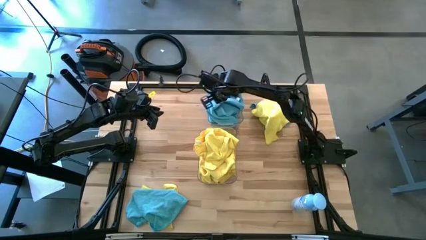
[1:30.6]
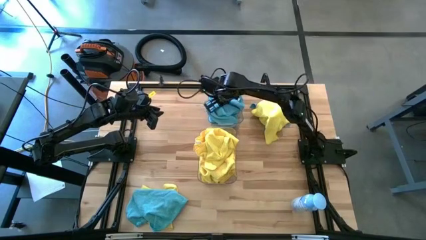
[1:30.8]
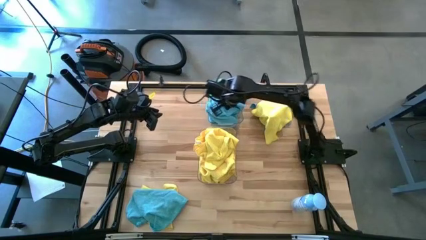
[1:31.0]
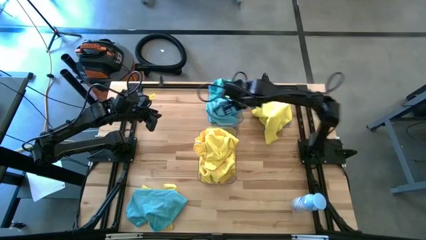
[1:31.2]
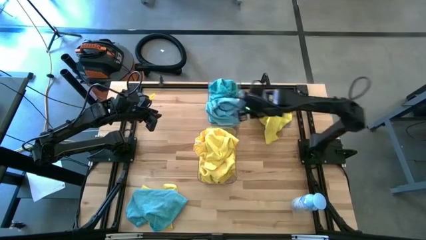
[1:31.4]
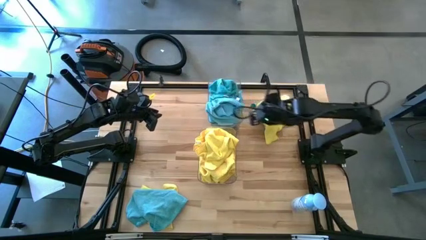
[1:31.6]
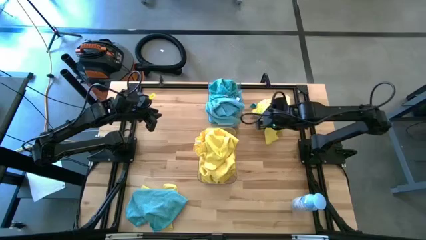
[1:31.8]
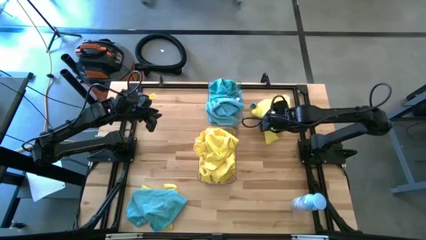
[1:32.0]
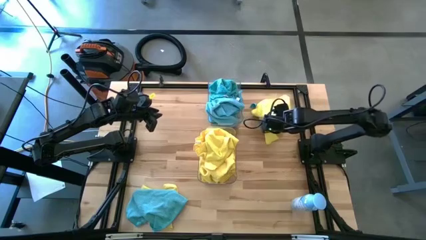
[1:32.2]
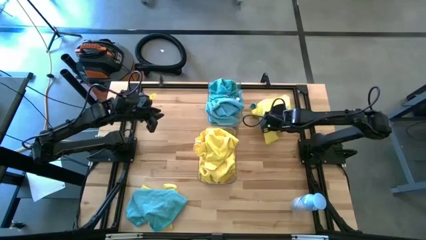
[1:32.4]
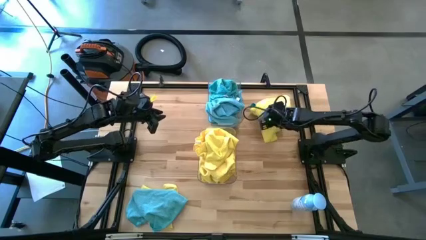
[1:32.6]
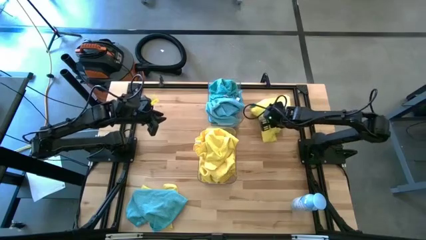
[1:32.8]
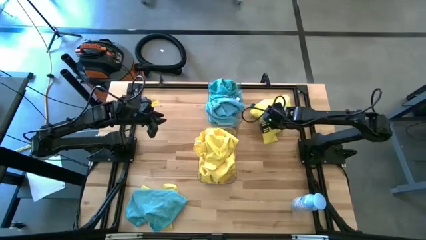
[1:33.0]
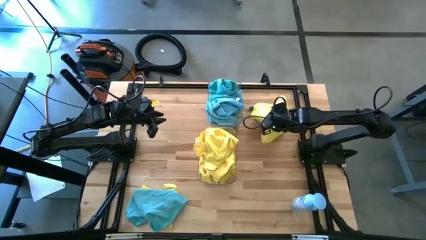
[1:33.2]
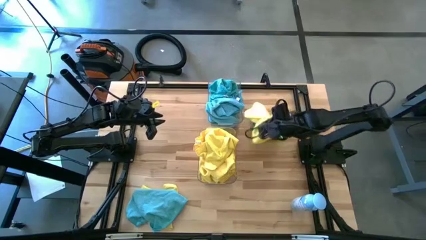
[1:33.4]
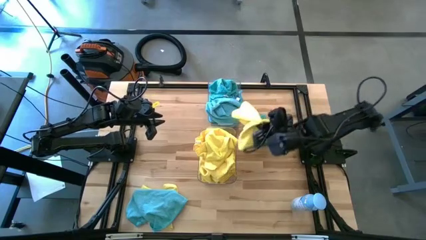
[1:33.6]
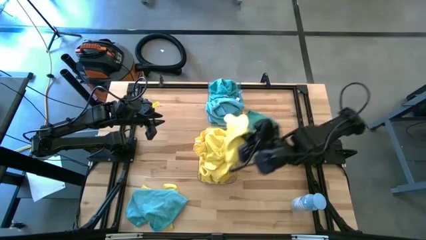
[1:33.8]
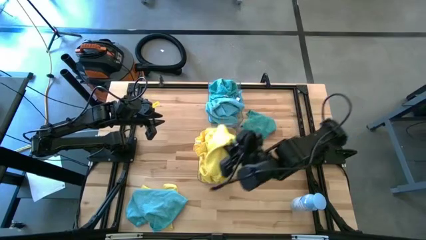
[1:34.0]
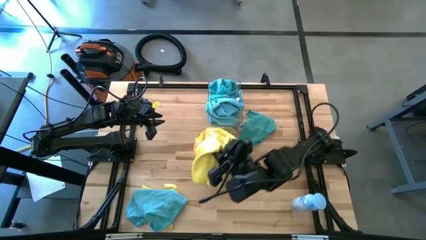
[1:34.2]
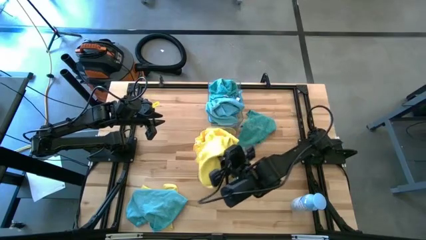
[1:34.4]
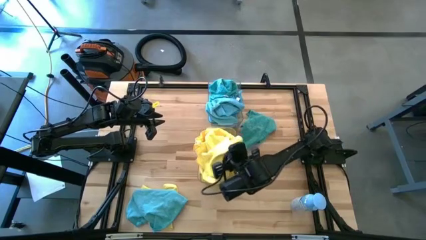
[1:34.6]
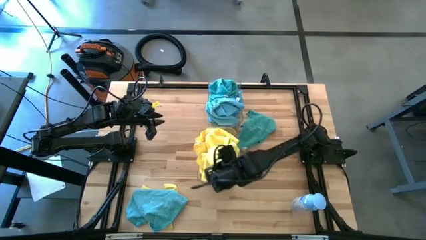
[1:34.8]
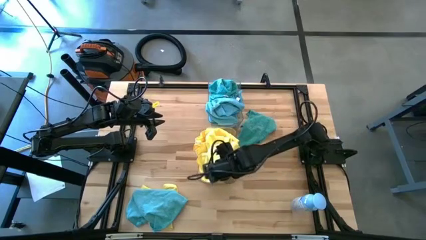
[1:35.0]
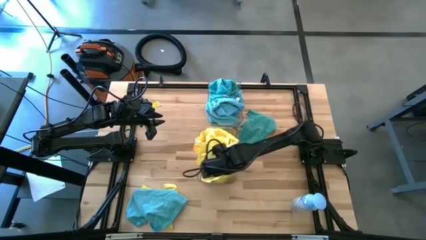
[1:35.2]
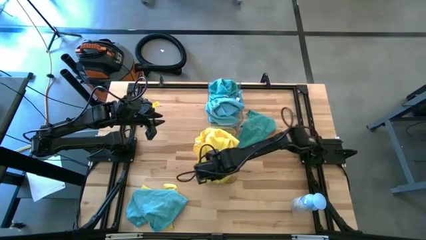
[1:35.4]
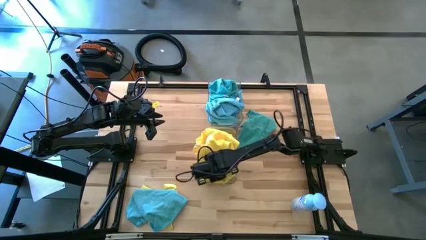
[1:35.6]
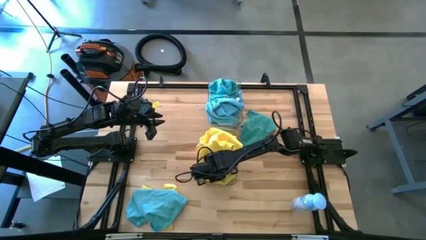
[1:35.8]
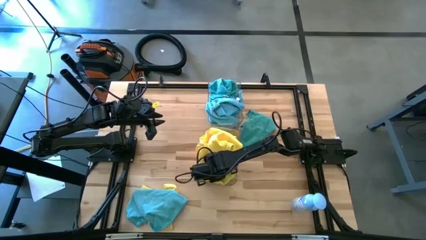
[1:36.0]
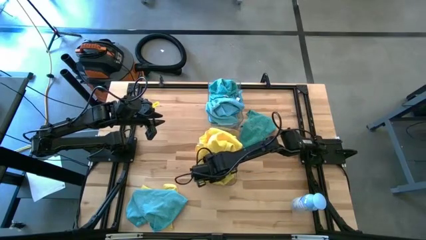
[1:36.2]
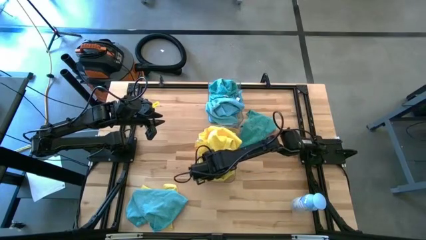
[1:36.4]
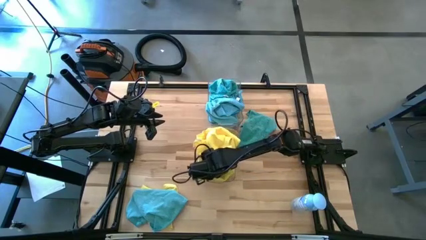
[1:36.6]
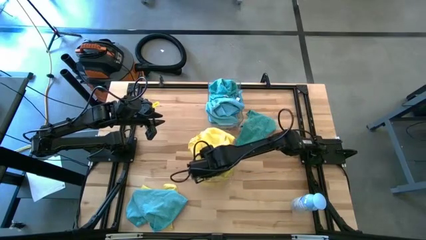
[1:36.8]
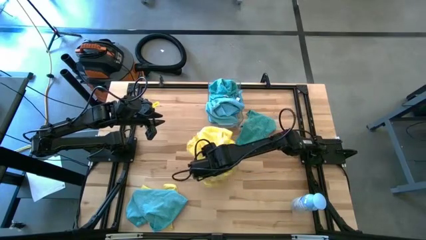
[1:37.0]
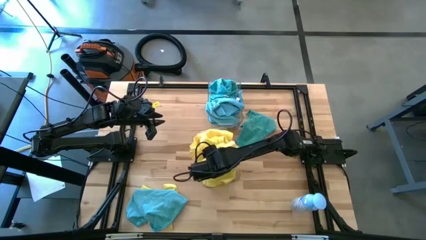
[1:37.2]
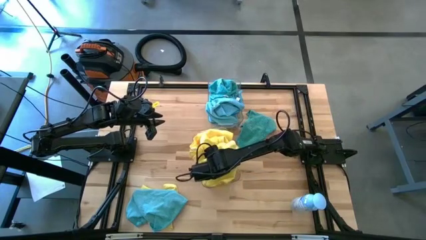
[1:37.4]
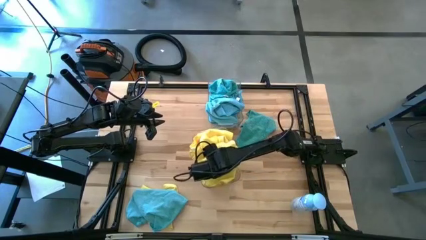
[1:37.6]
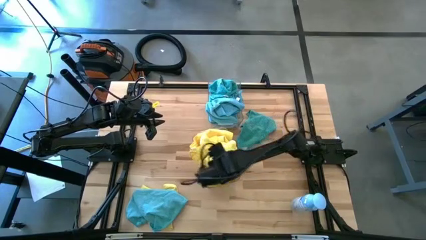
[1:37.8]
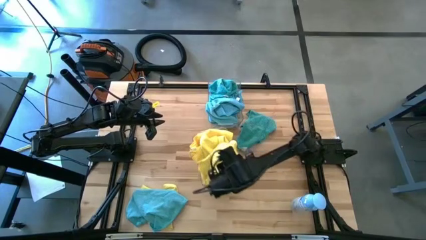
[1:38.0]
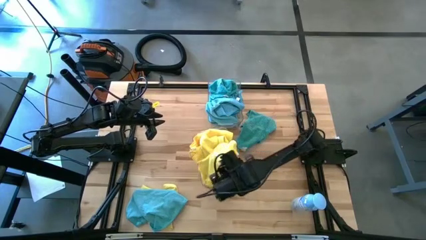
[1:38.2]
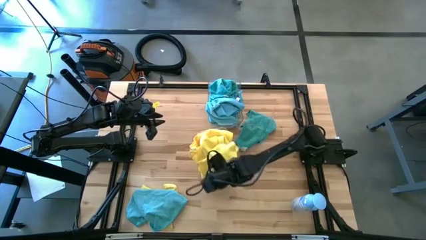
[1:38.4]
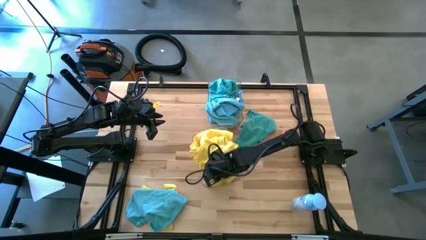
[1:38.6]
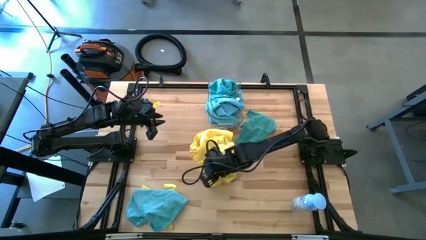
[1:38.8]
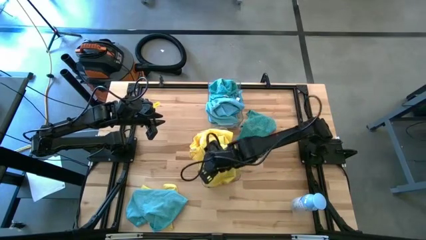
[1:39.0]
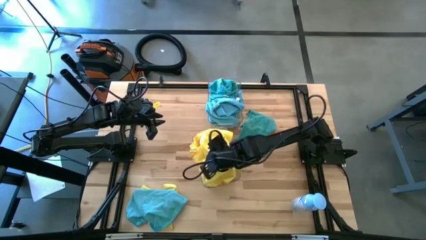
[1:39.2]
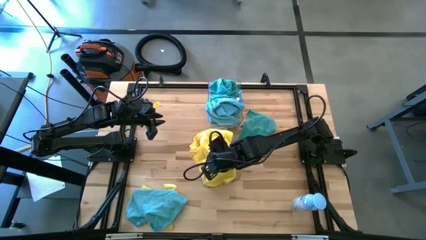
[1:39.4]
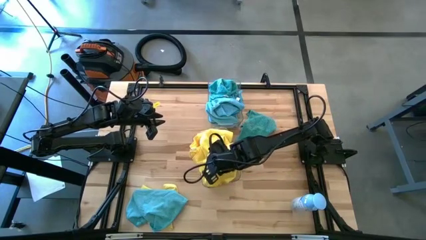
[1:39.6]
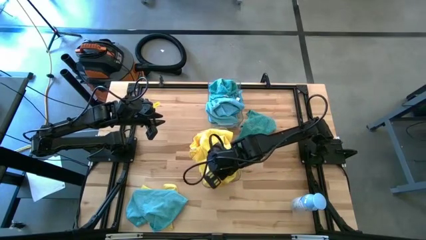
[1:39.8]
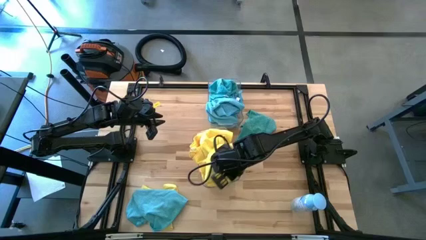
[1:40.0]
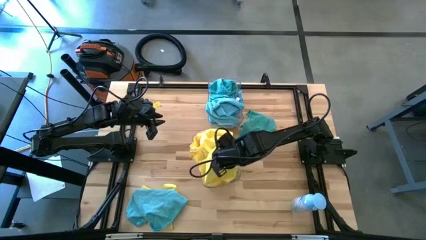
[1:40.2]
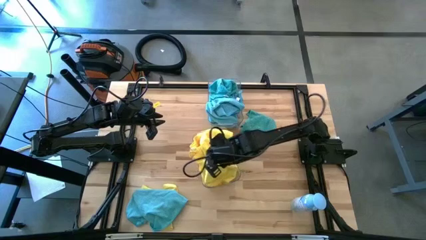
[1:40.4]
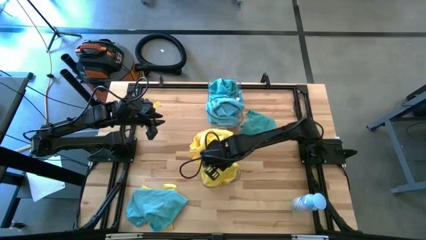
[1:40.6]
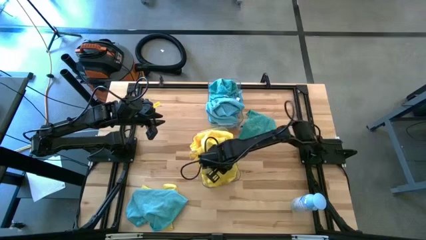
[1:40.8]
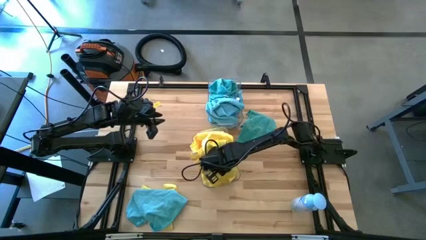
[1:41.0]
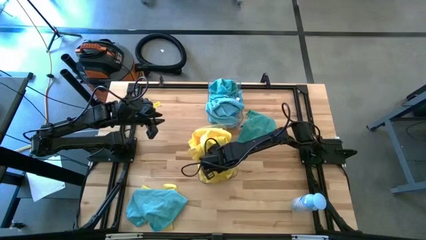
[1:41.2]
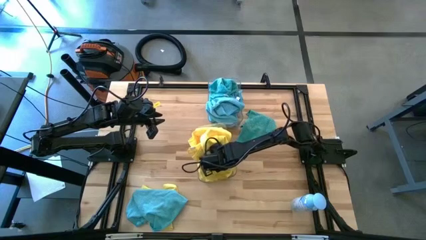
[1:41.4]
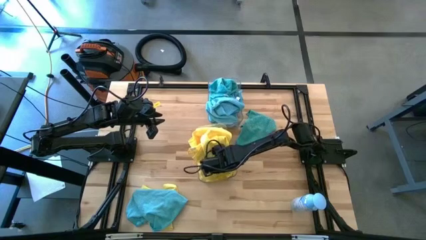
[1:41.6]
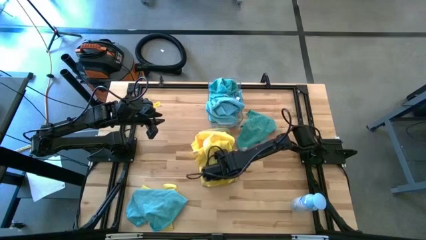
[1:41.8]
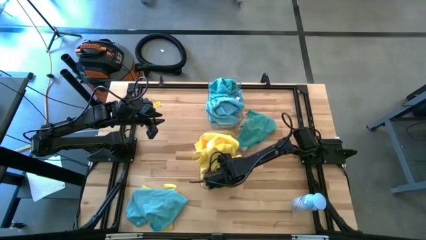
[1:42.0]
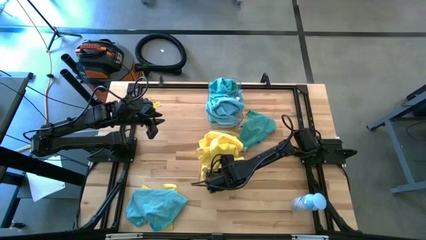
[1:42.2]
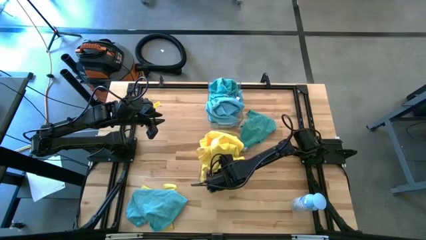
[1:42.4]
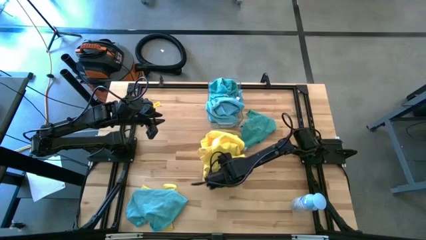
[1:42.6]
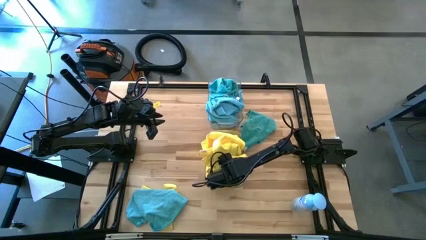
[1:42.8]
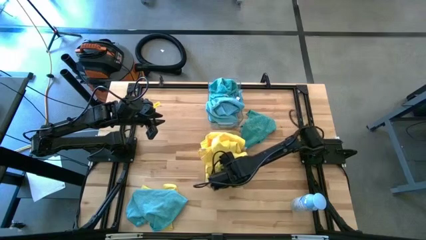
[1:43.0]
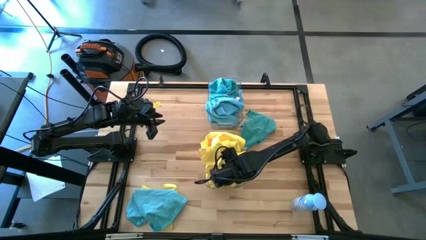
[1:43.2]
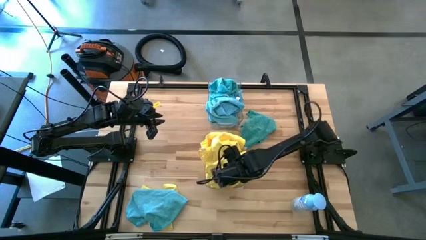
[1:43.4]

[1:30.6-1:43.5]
Task: Sort microfiber towel by color & place in baskets
Put the yellow towel into the bottom transparent bin

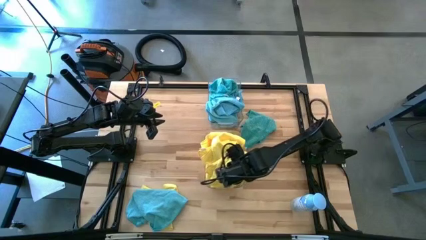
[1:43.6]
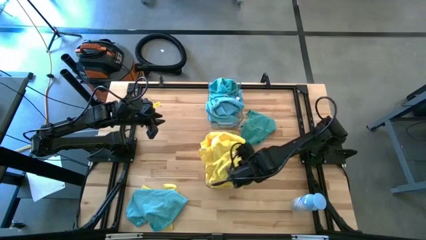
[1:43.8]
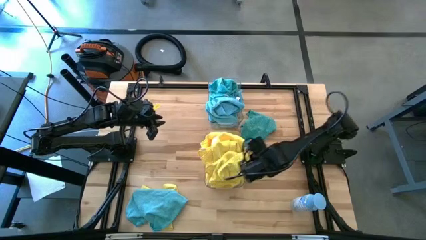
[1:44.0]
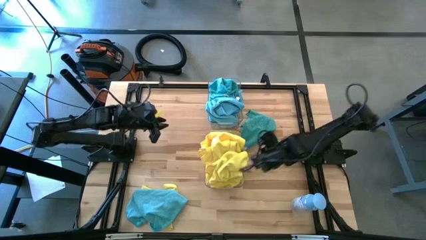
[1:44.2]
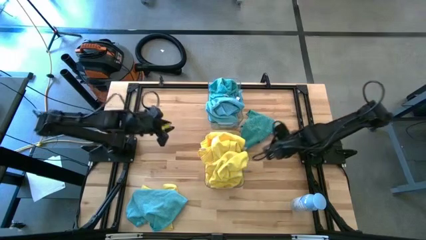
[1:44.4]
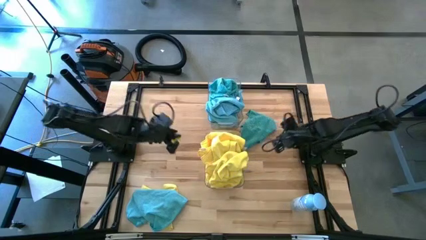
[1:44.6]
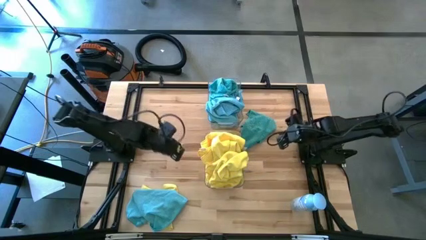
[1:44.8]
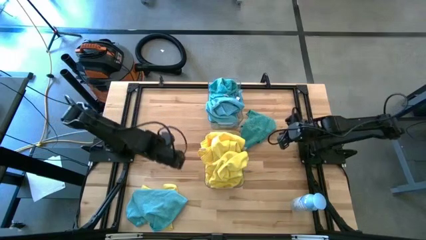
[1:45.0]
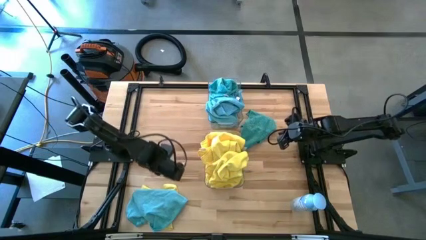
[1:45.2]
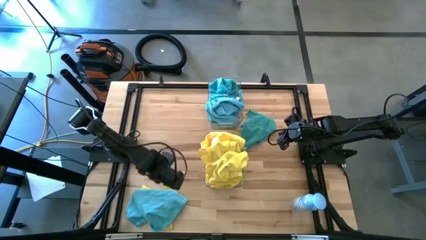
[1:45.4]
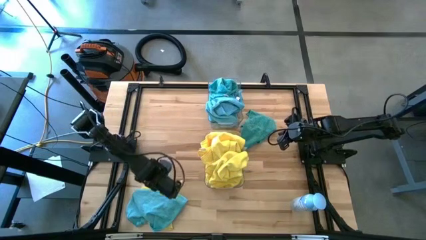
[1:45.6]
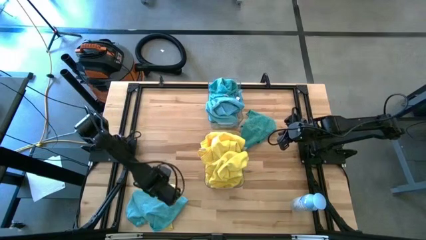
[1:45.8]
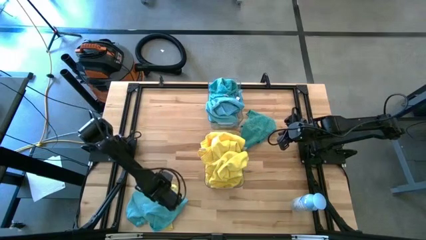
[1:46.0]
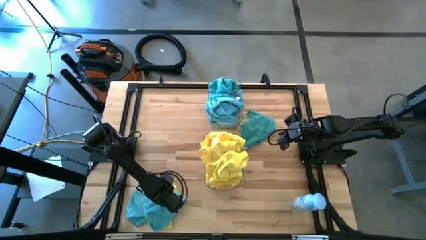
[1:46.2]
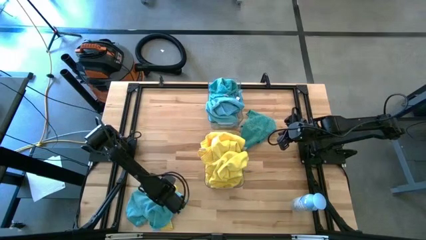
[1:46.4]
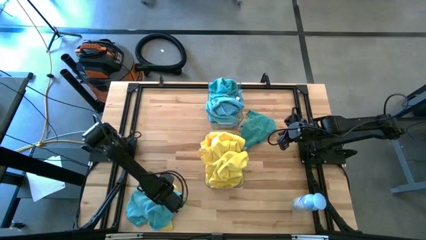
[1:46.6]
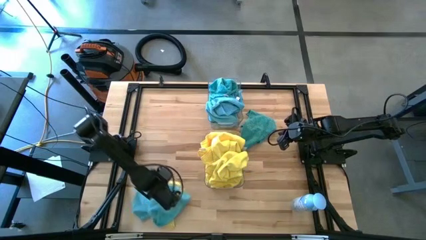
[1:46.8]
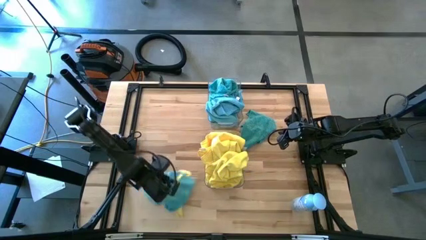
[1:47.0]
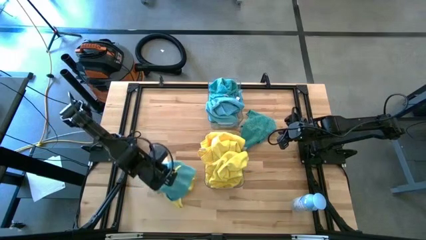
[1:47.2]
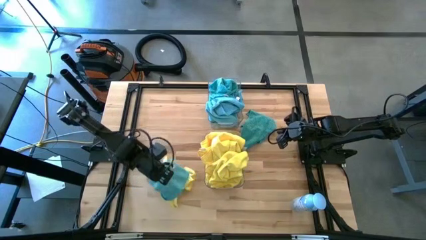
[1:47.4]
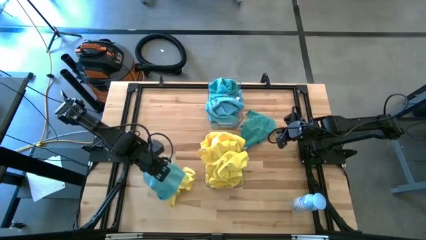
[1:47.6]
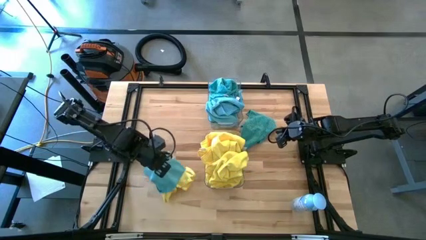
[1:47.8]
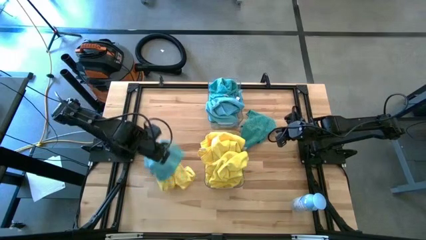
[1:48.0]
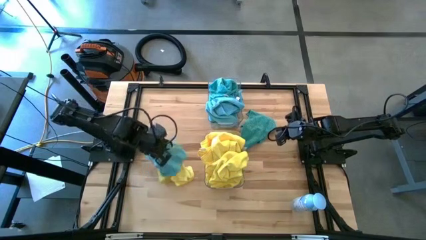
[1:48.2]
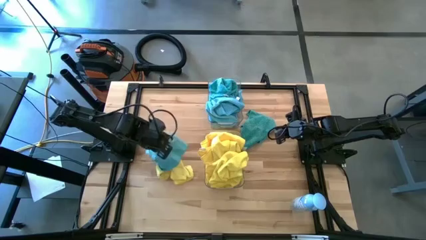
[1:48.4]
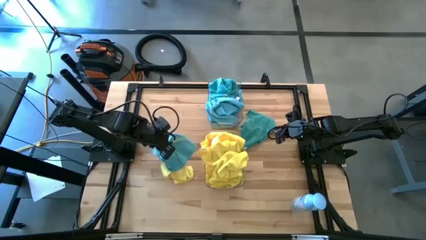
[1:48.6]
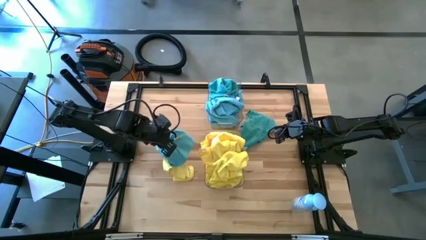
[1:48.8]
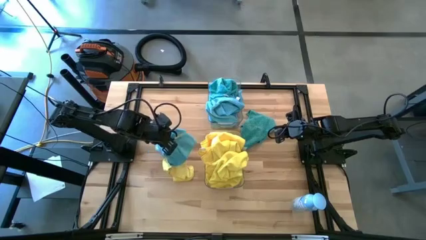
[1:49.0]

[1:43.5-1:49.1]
Put the blue towel into the top transparent bin
